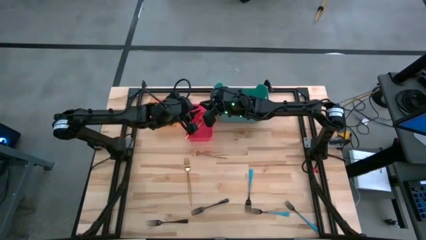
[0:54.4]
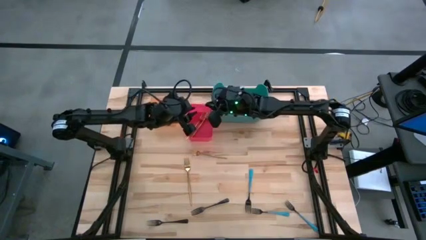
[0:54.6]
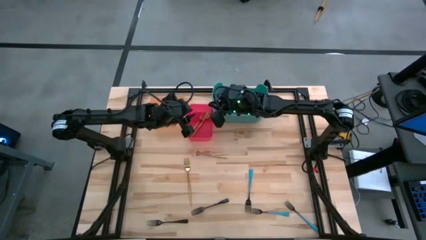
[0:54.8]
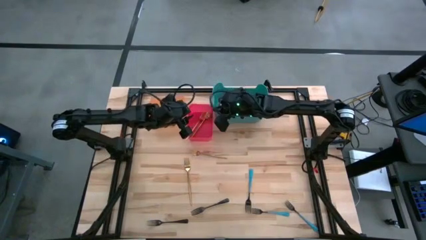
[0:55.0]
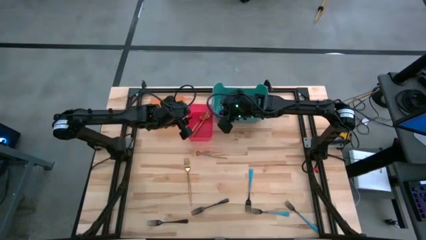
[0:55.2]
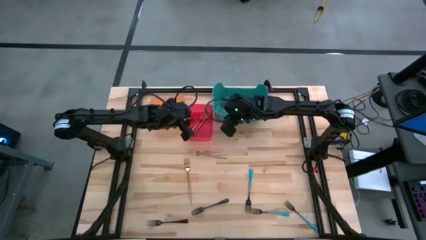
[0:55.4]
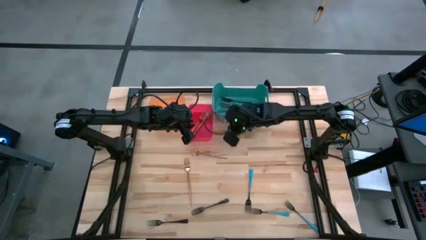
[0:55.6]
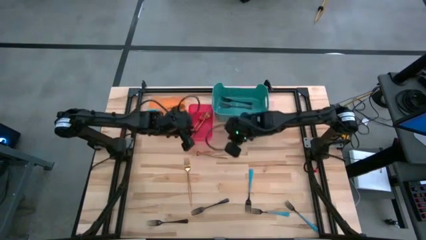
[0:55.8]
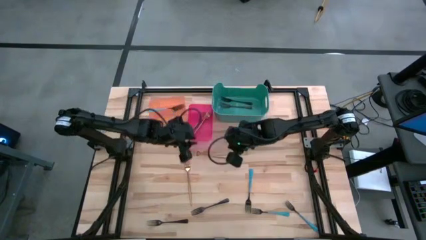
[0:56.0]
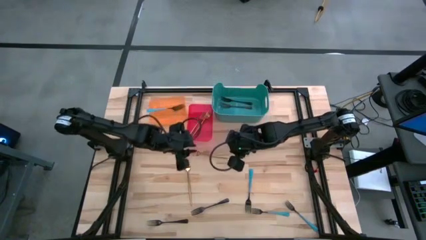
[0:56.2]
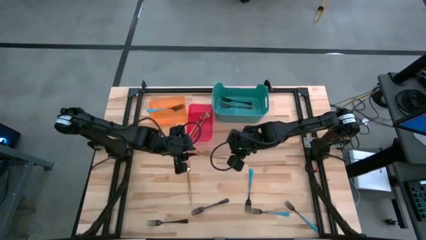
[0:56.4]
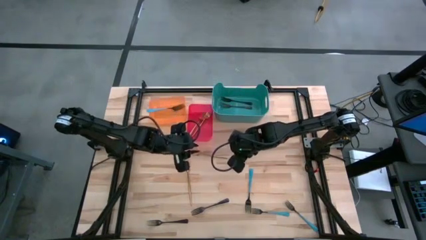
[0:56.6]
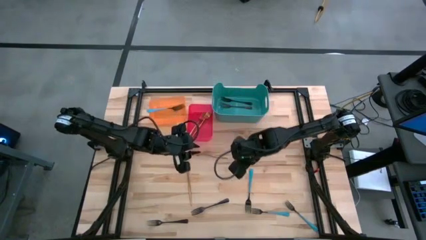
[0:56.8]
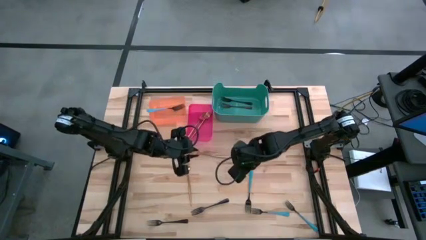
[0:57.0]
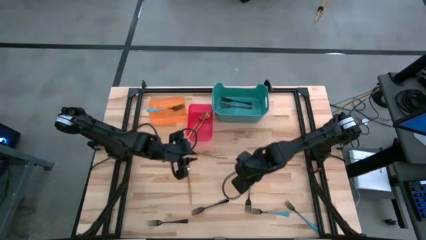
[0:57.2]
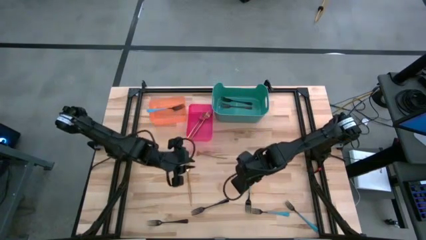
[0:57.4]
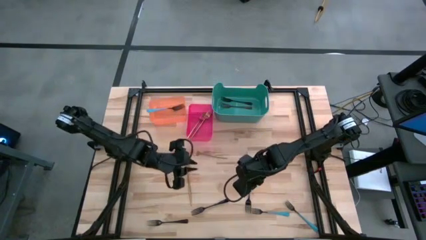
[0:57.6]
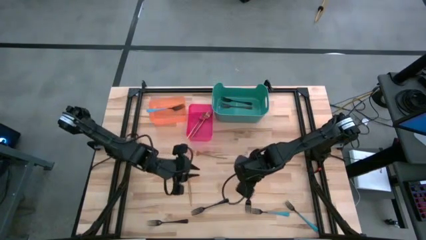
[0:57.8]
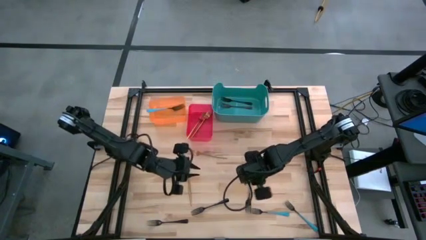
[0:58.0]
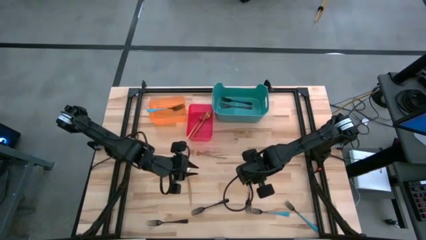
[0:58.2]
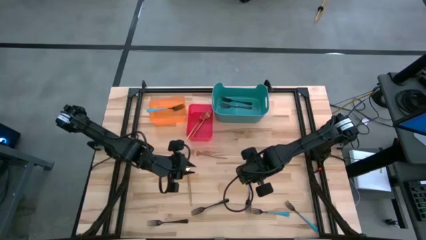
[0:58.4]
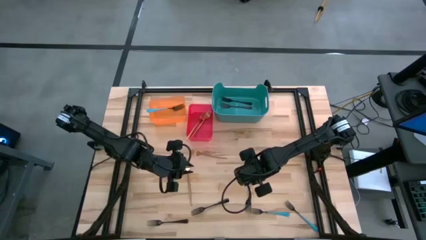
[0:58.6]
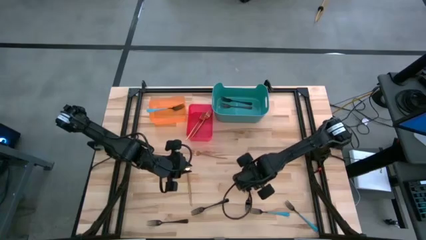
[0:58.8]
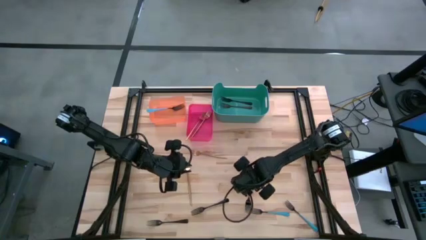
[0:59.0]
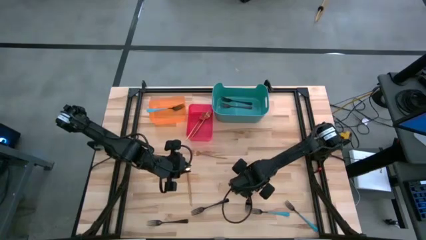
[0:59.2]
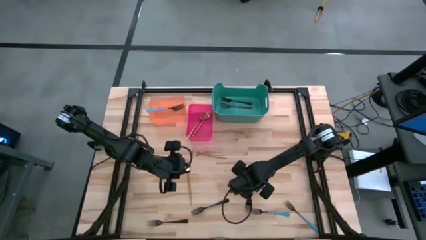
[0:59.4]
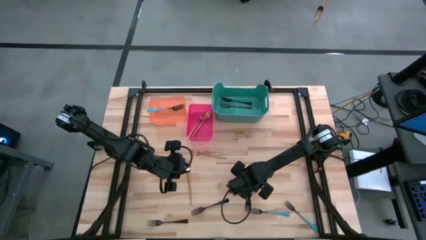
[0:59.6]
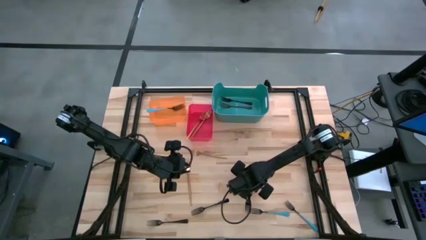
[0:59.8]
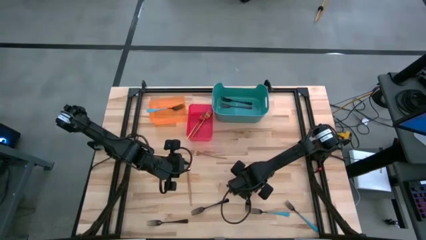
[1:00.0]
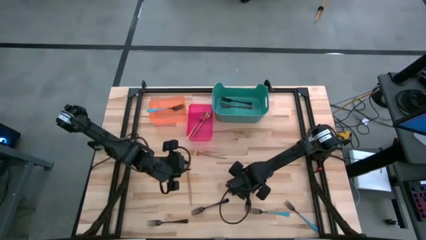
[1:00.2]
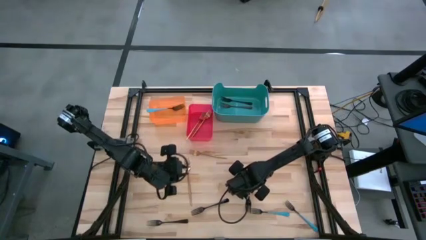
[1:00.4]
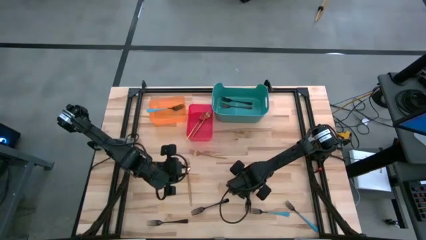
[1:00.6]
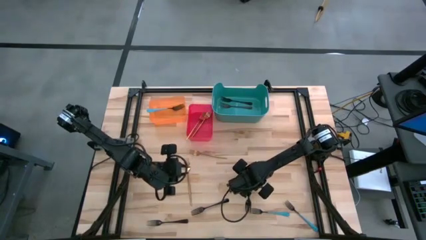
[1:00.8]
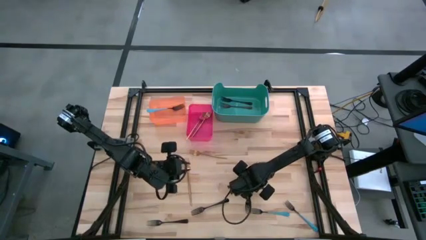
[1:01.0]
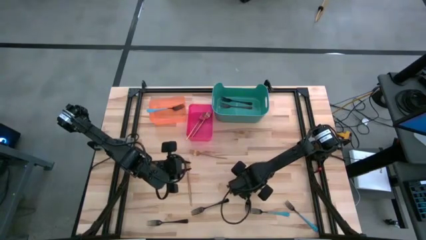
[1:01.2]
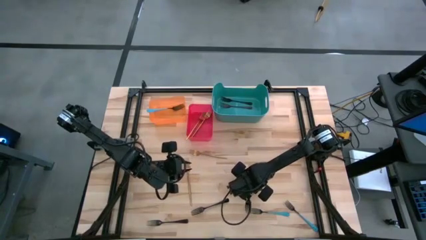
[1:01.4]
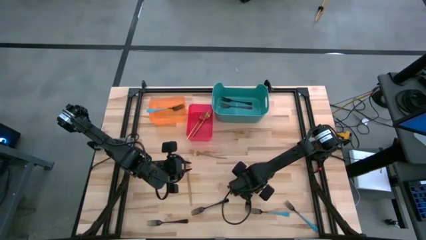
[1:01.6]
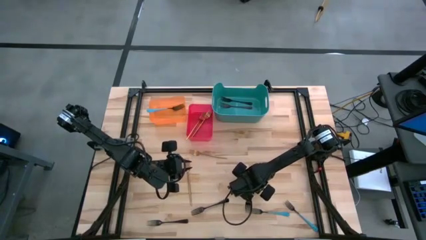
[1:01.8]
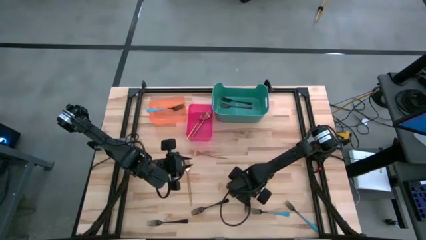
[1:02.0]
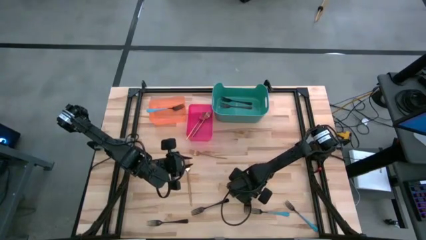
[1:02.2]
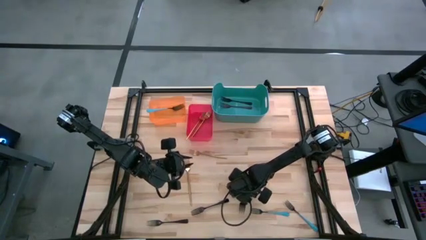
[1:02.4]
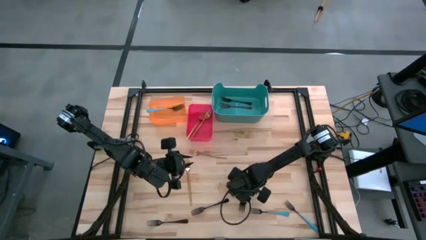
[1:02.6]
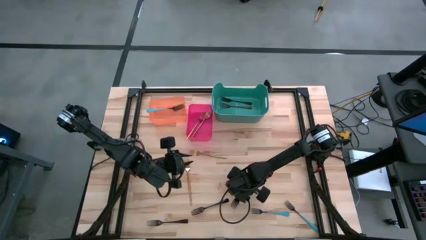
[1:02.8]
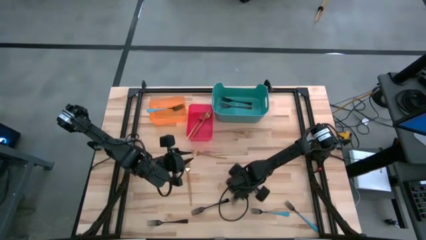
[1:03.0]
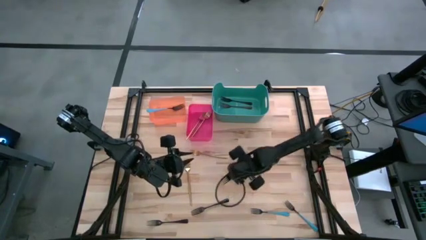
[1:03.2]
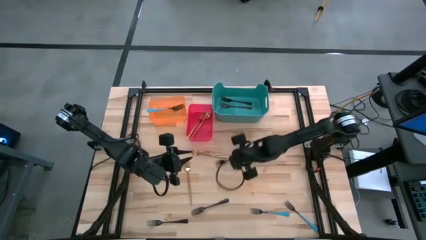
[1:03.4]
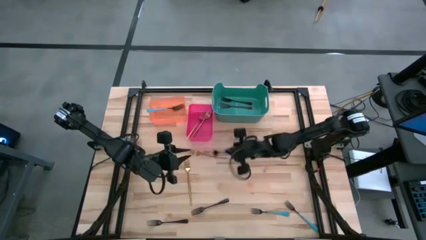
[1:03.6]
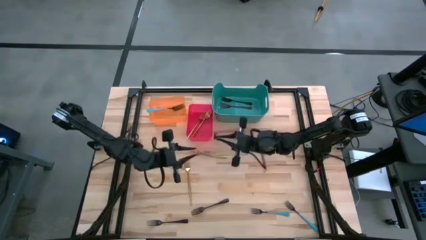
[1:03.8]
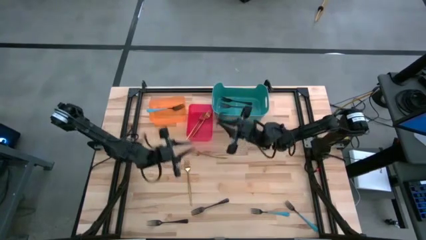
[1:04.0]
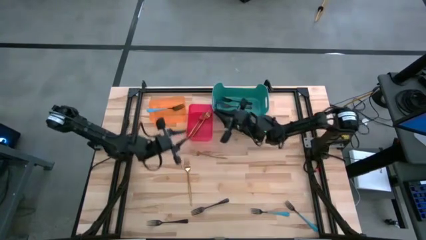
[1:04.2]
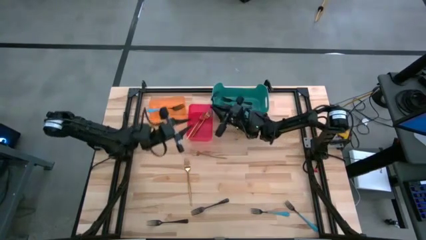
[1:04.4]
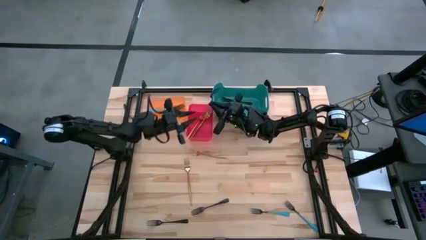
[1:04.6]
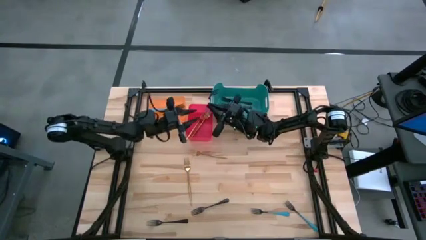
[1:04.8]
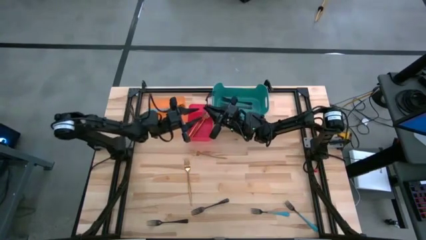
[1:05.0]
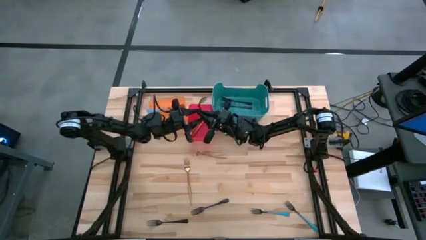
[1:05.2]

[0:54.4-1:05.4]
Task: Sort silverware by color (type)
Put the blue fork into the orange bin
